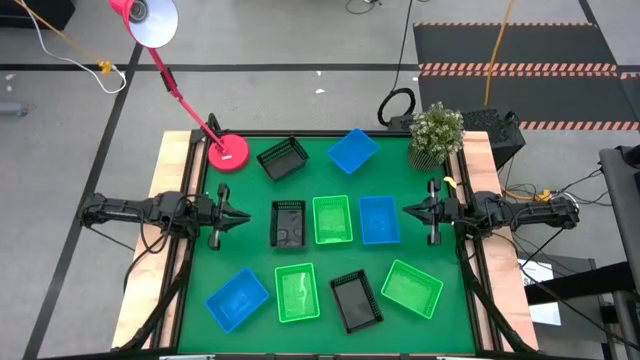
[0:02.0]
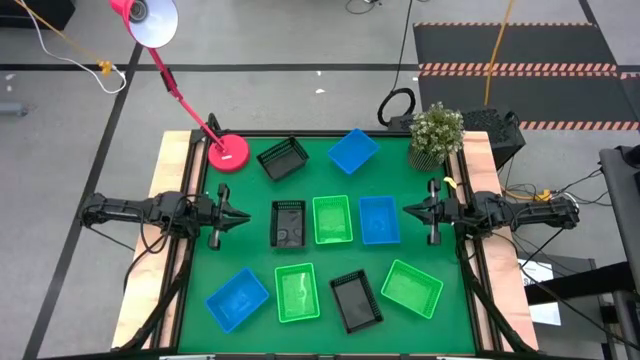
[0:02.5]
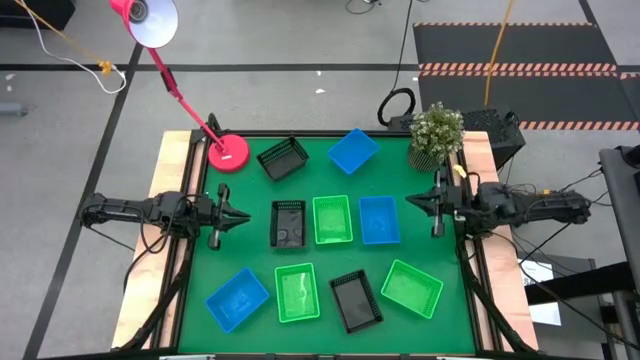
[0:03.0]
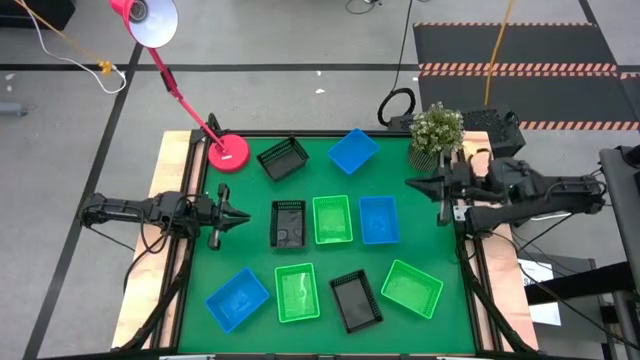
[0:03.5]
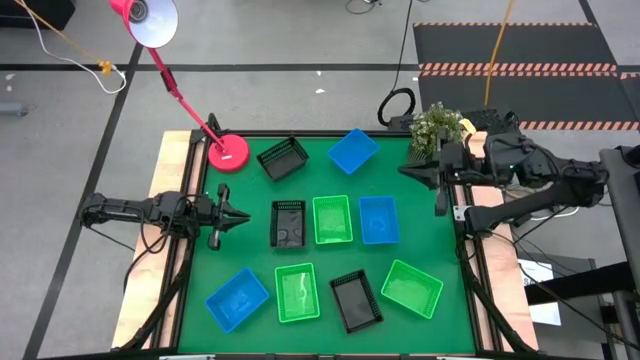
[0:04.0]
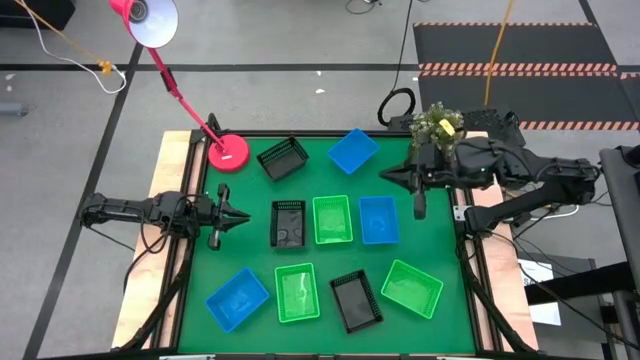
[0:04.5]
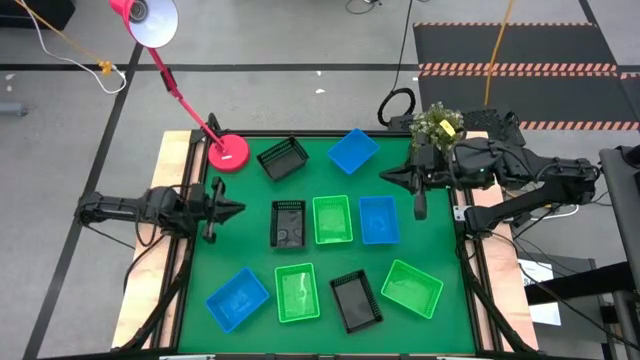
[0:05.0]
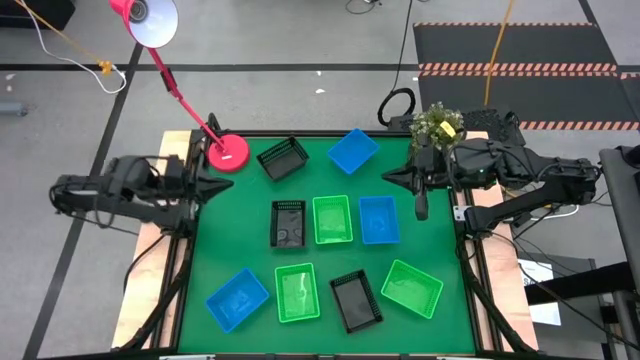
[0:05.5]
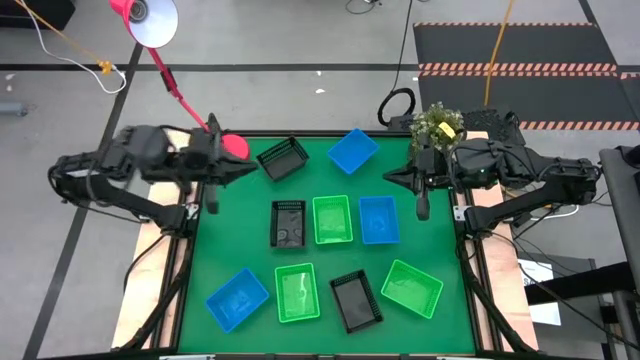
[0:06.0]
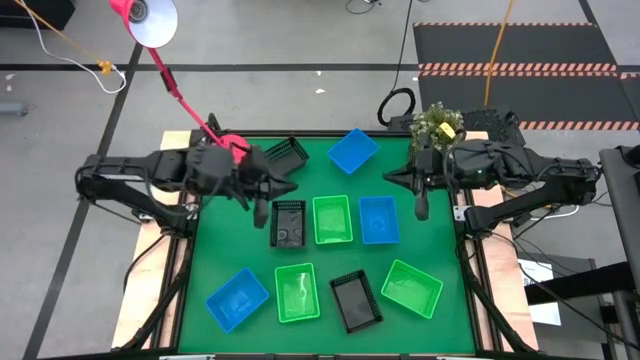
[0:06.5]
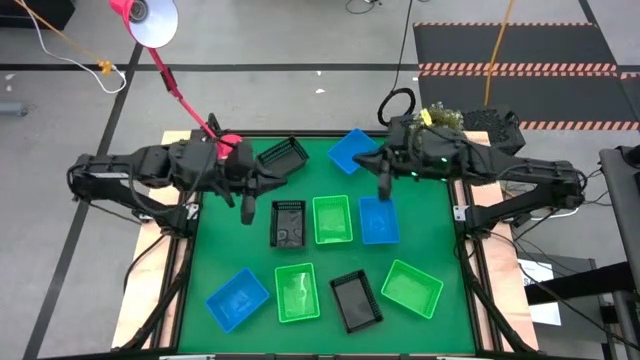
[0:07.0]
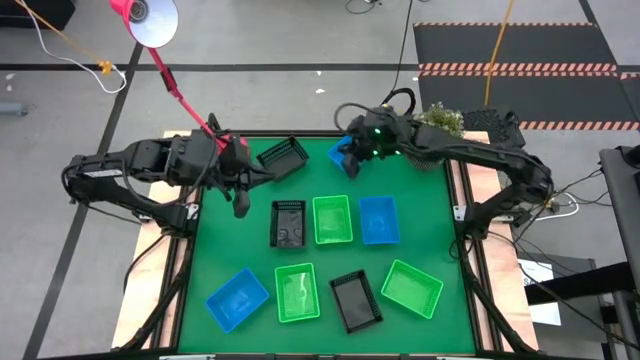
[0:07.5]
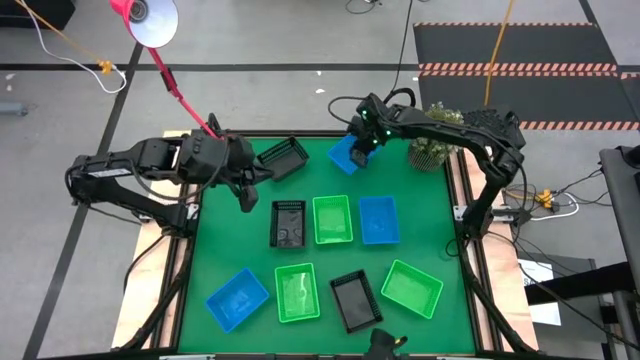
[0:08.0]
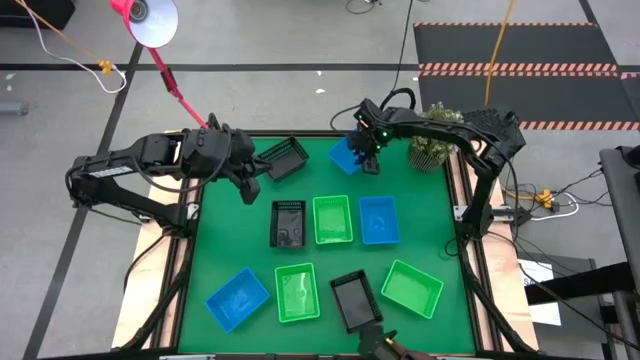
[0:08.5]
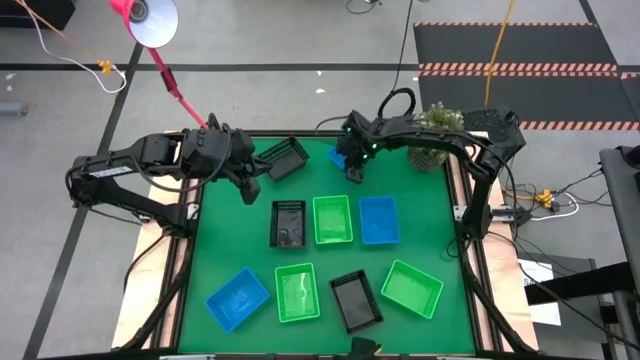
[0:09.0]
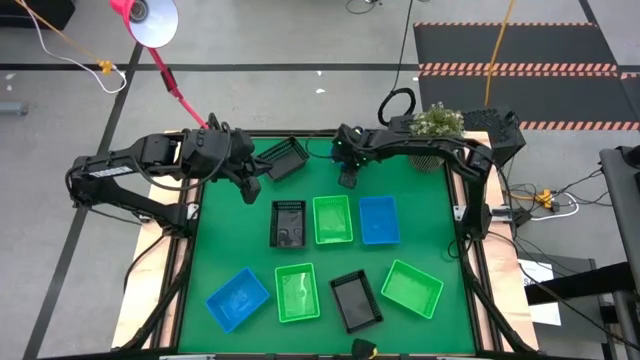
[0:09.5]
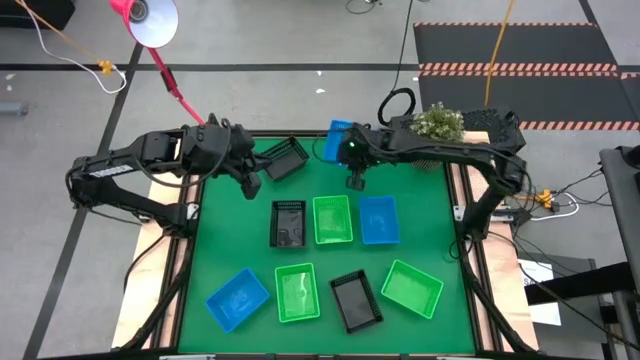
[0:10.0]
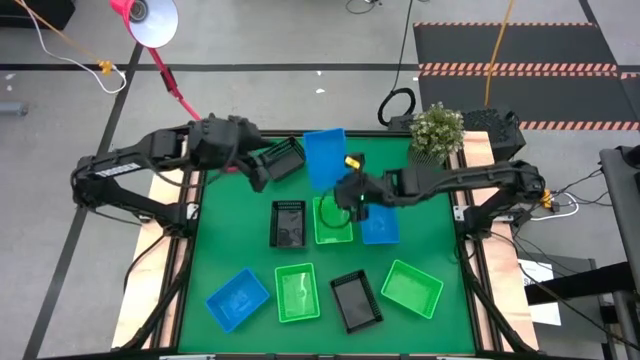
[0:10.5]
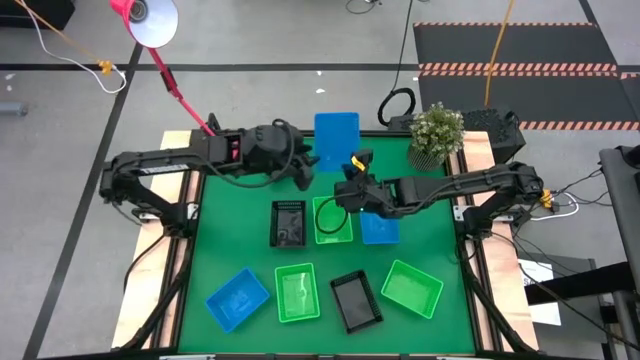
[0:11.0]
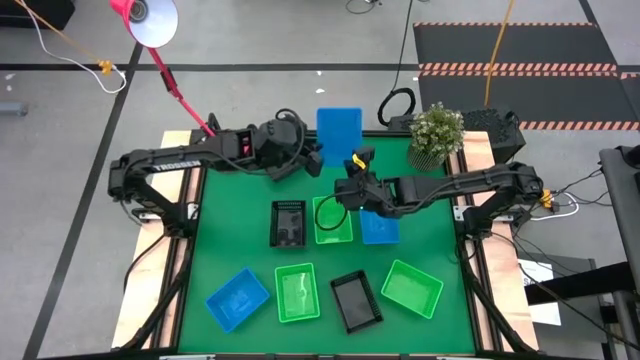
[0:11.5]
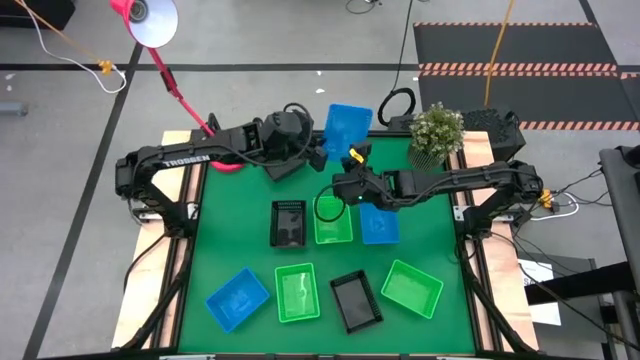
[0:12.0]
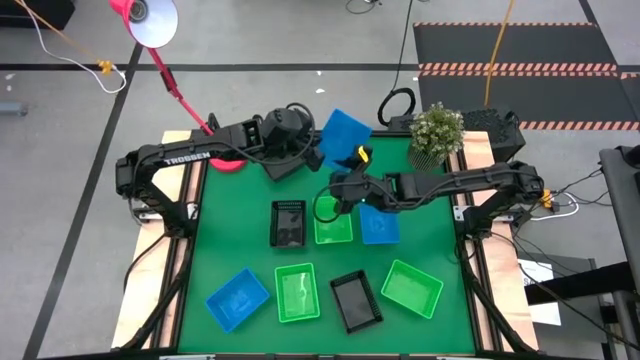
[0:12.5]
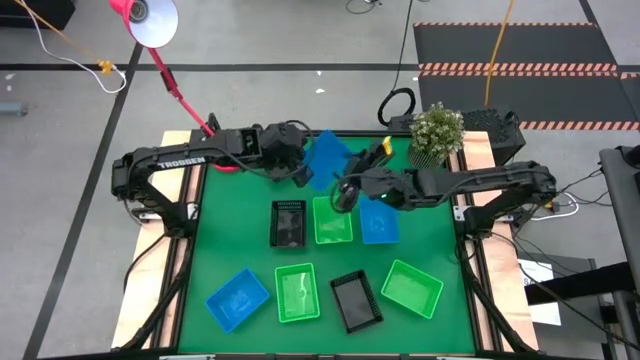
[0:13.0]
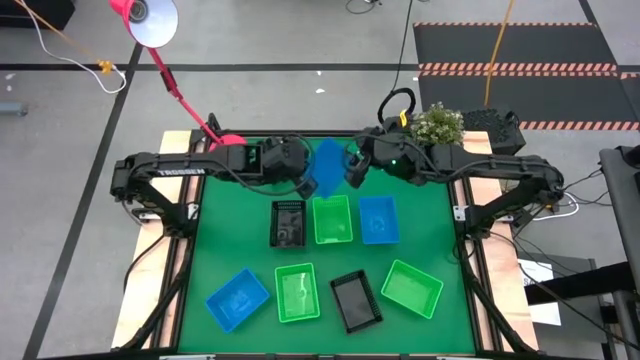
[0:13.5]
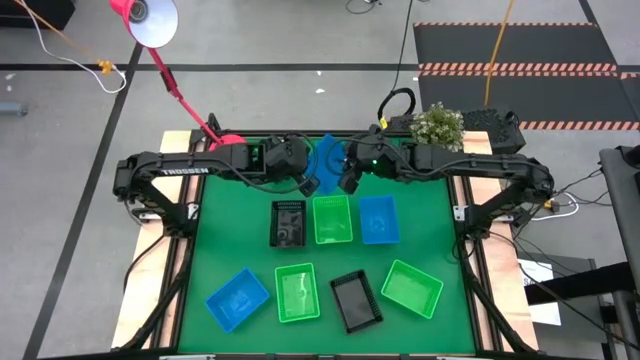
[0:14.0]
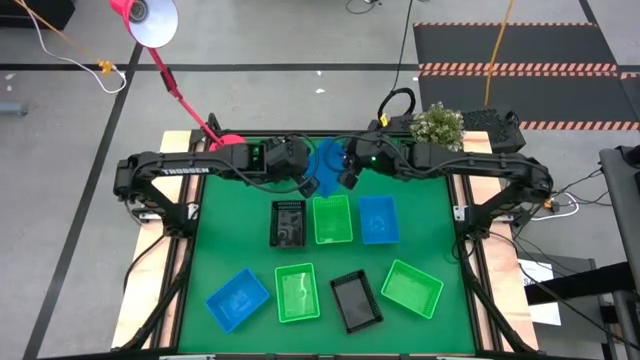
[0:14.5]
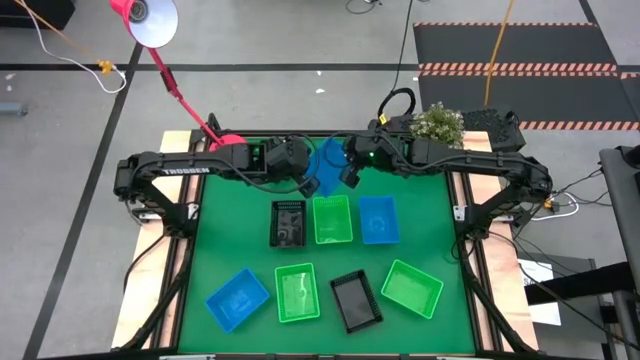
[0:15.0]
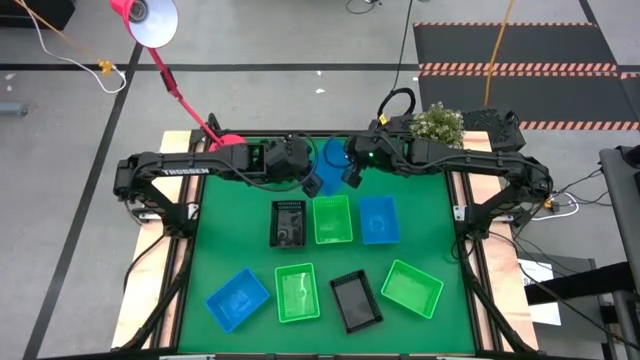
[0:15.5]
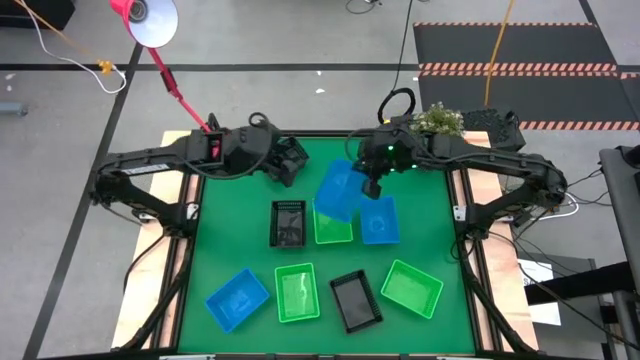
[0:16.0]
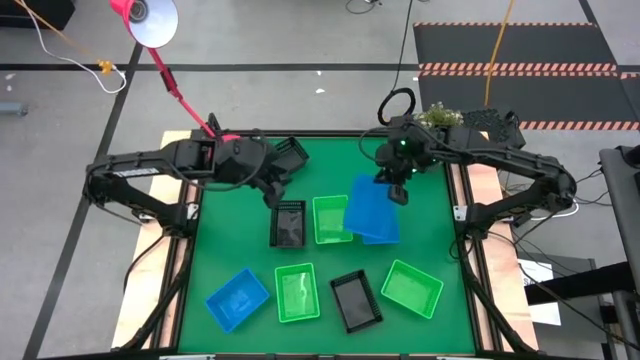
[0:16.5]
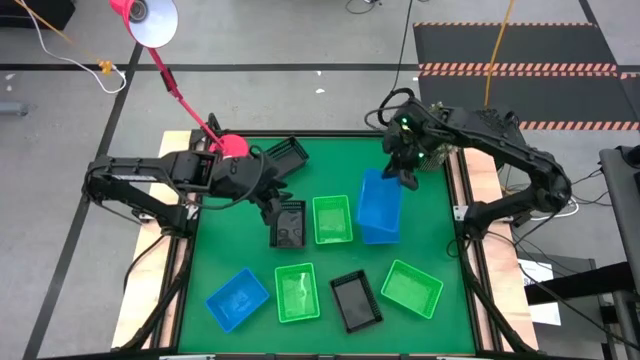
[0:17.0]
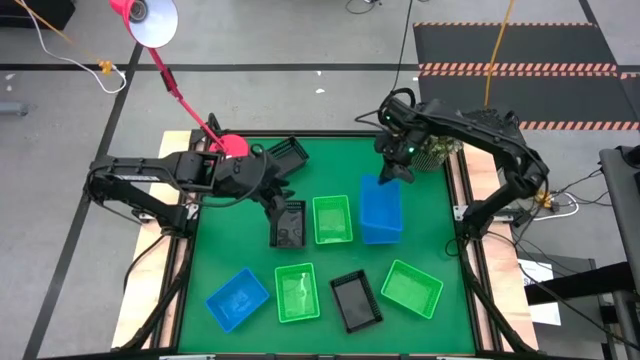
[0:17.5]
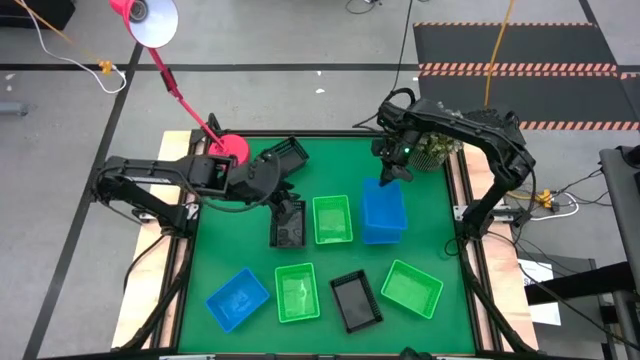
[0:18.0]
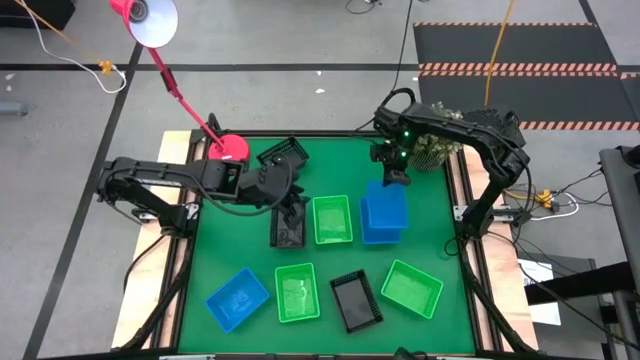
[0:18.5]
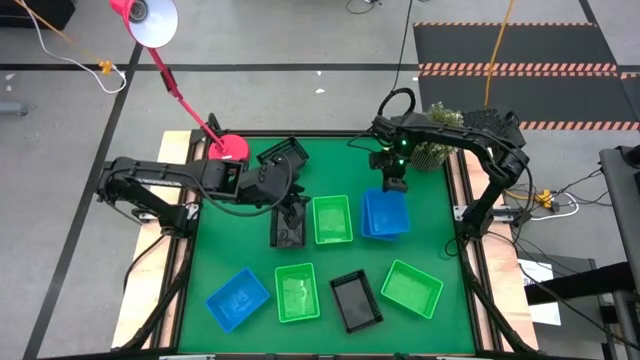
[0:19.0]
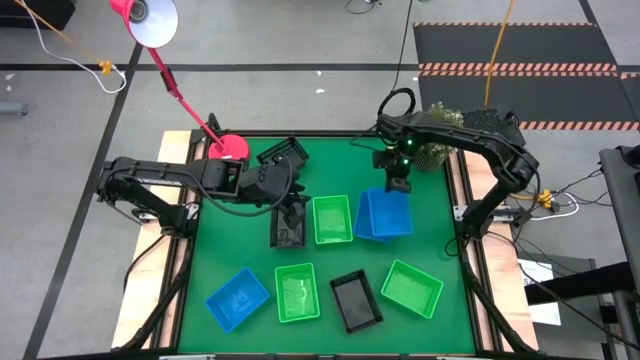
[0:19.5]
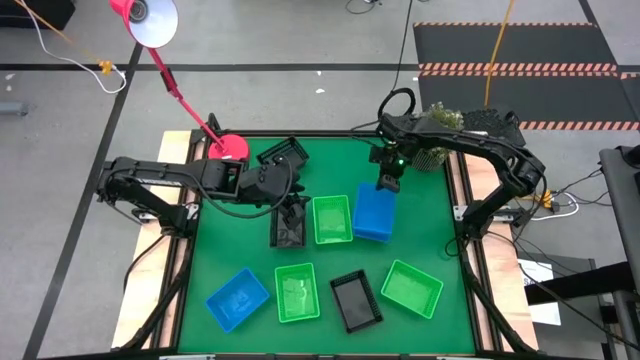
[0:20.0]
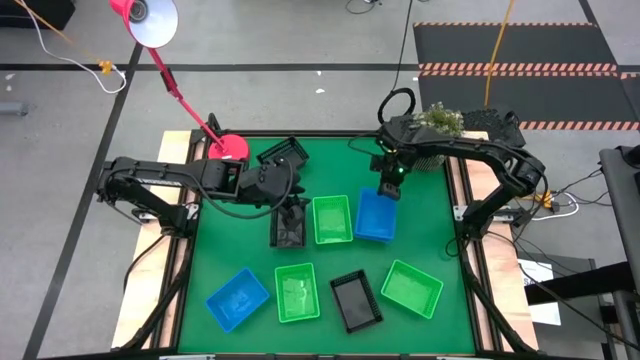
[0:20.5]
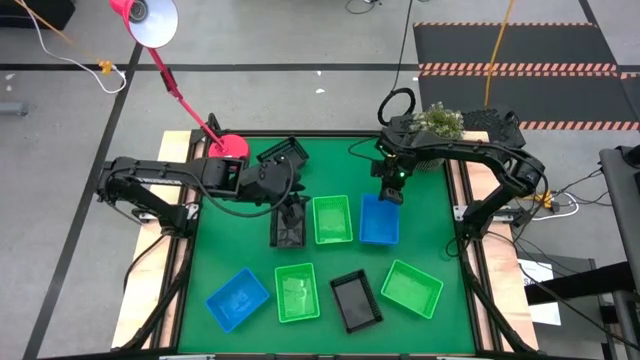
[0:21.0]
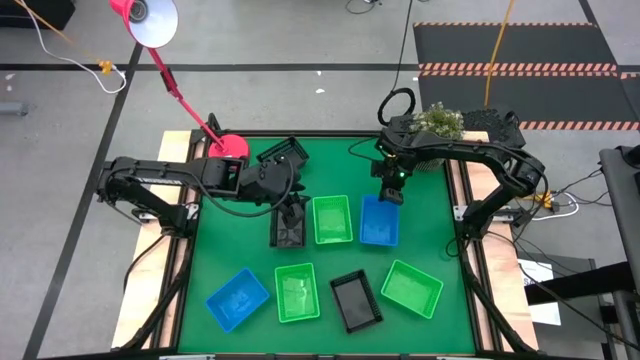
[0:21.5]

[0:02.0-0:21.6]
Stack the top blue bin on the middle blue bin
